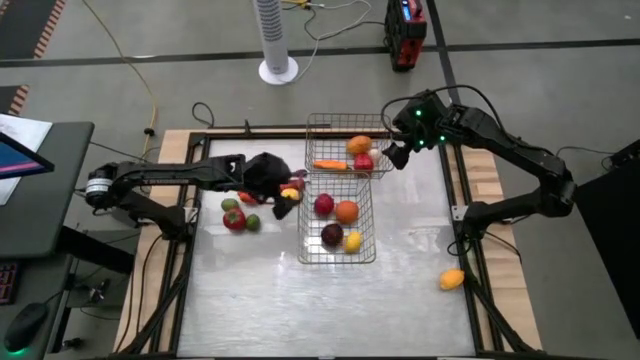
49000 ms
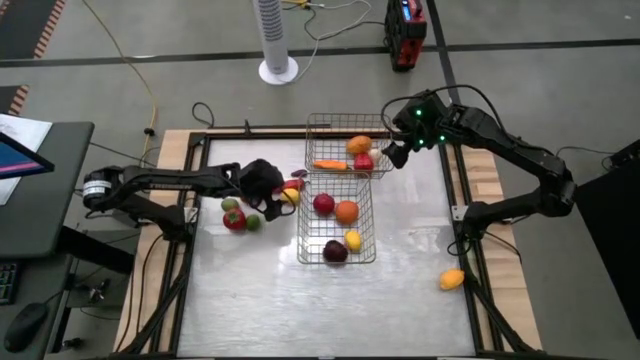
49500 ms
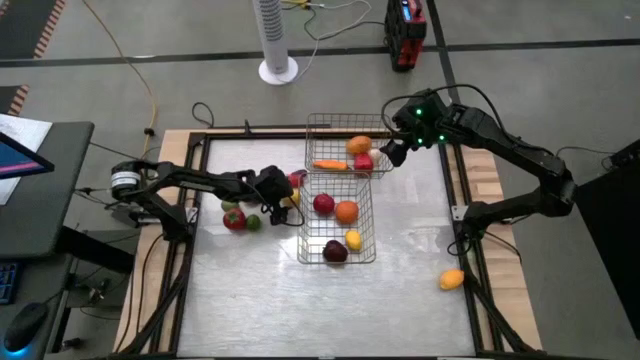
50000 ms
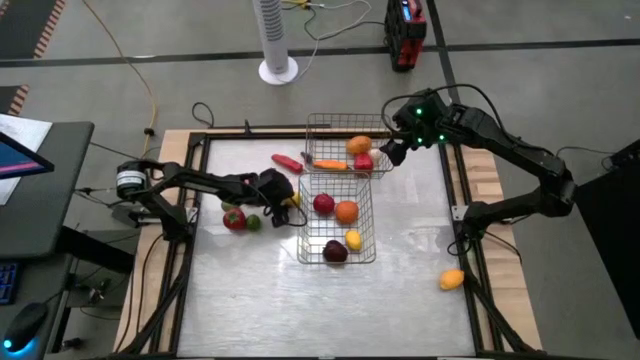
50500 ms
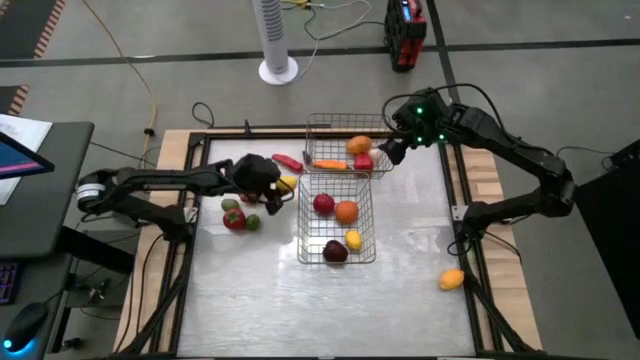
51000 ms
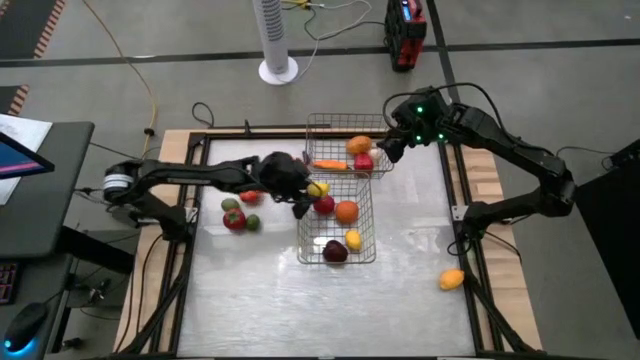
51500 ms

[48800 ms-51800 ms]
Task: Sort produce into baskets
Put the left lemon into the bottom wire basket

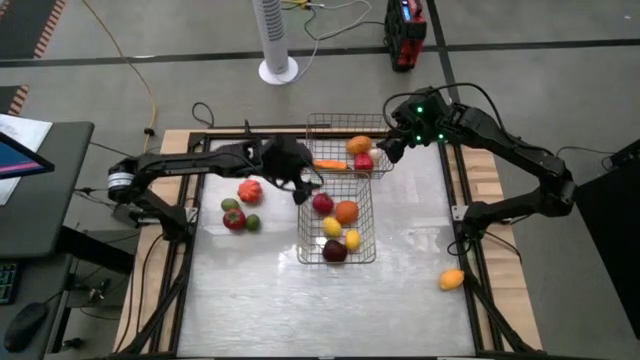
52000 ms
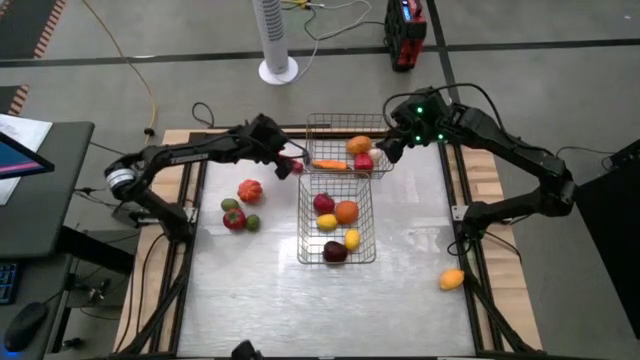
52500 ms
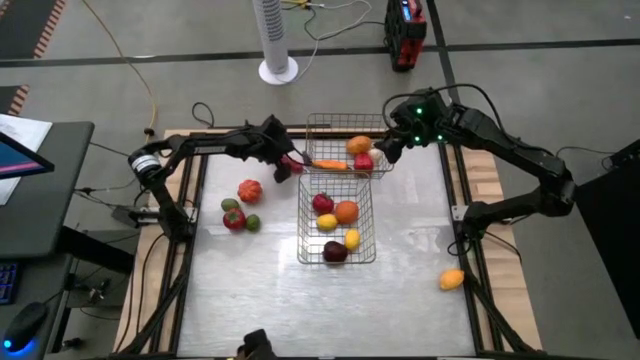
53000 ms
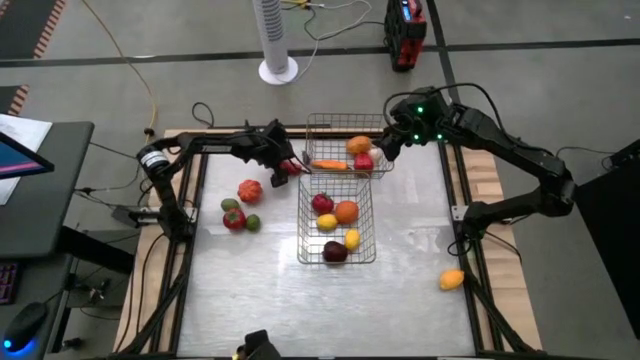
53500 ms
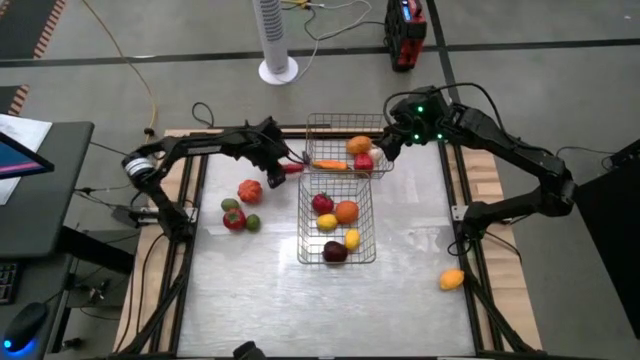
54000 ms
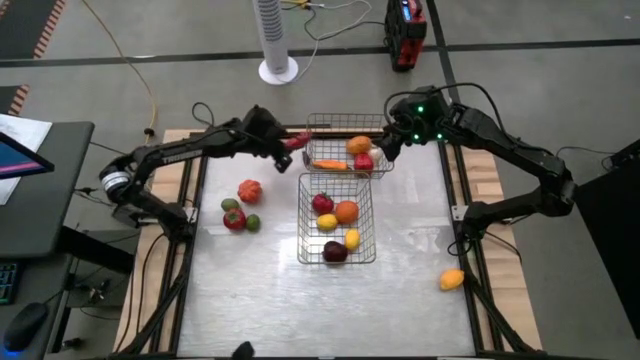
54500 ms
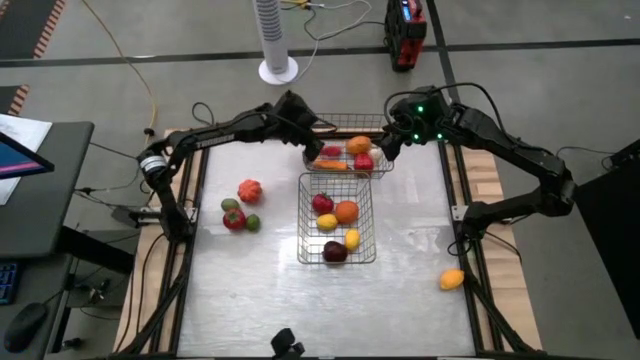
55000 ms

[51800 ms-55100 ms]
Put the red chili pepper into the top wire basket

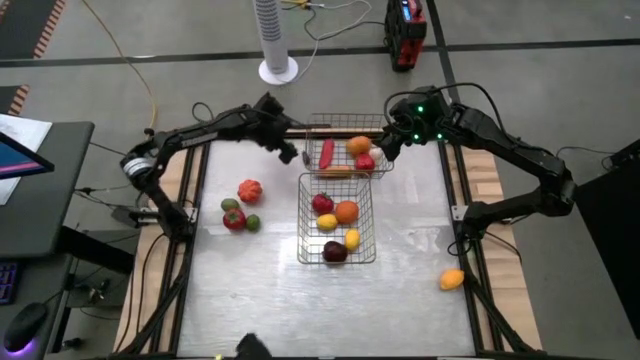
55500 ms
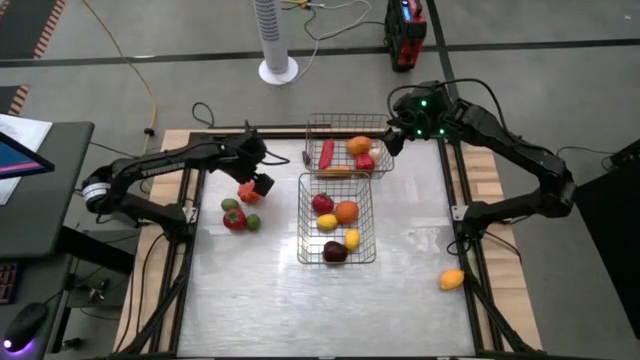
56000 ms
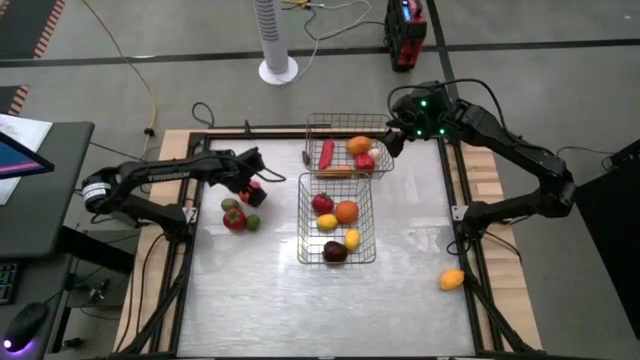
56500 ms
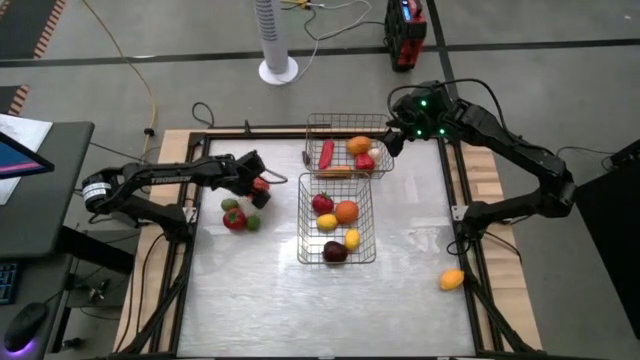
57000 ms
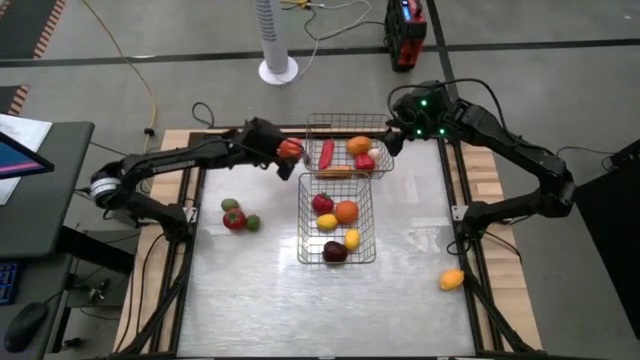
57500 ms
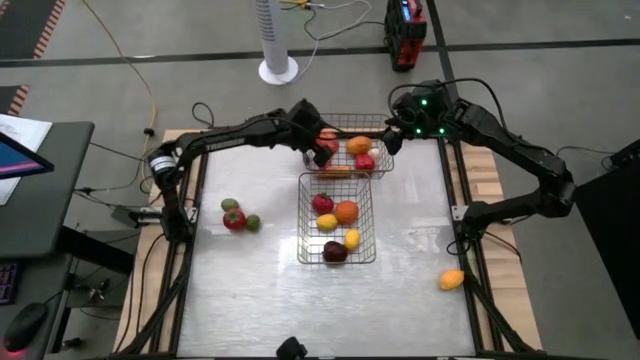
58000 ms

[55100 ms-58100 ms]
Put the pumpkin into the top wire basket

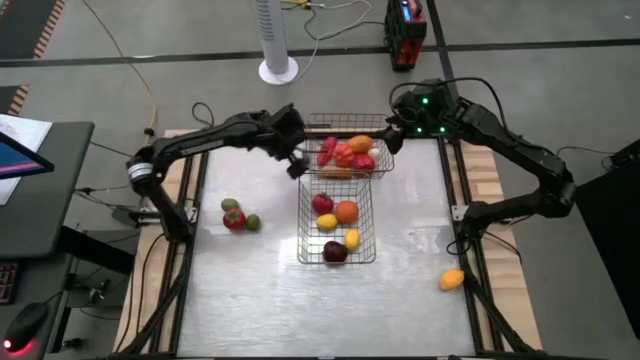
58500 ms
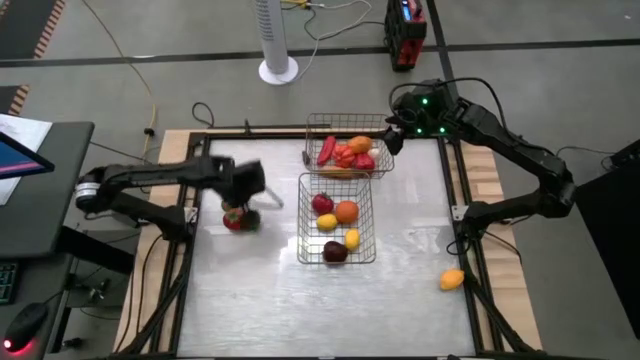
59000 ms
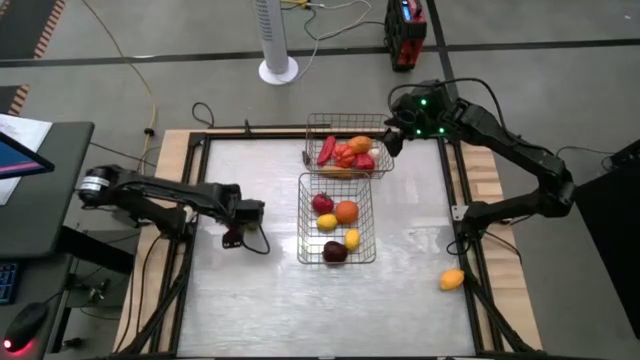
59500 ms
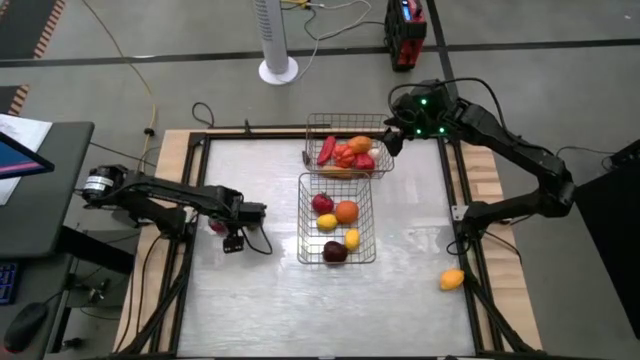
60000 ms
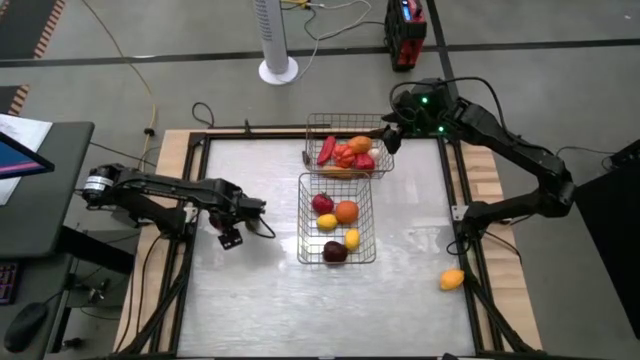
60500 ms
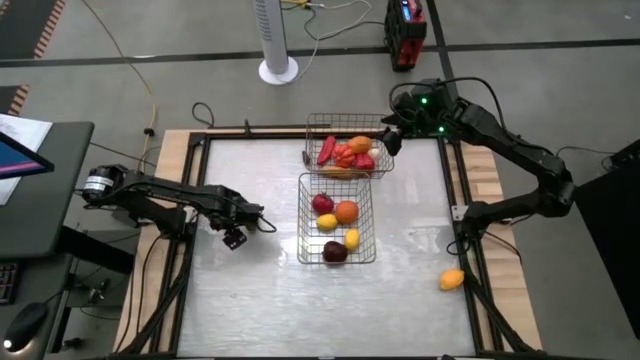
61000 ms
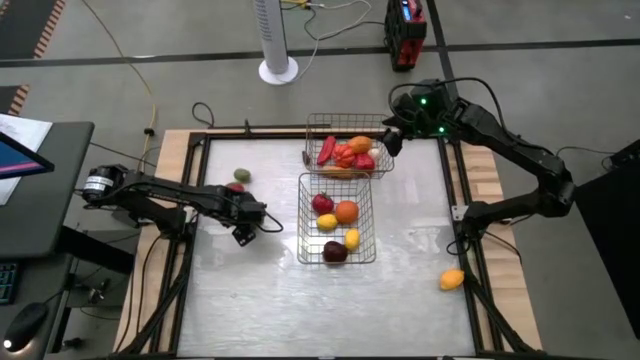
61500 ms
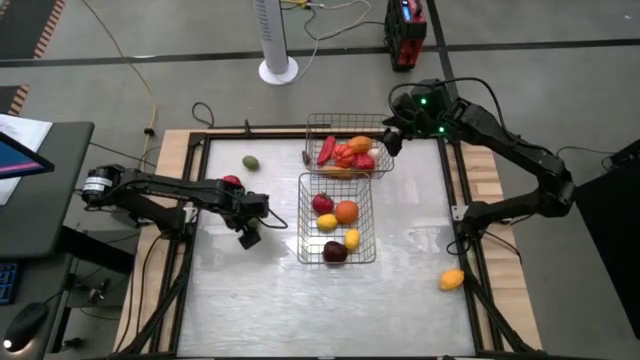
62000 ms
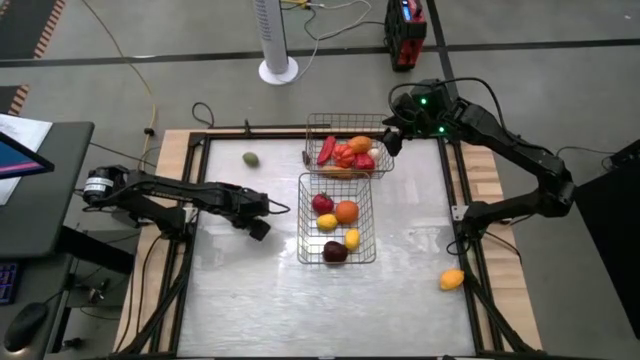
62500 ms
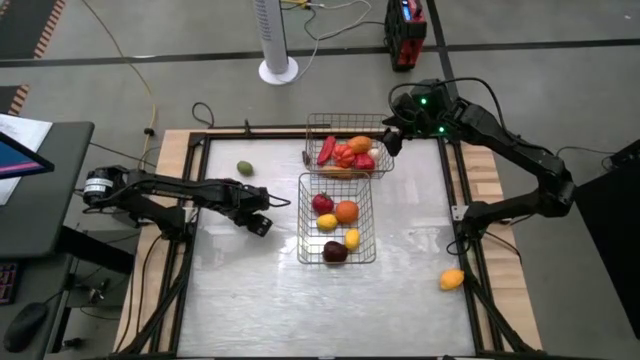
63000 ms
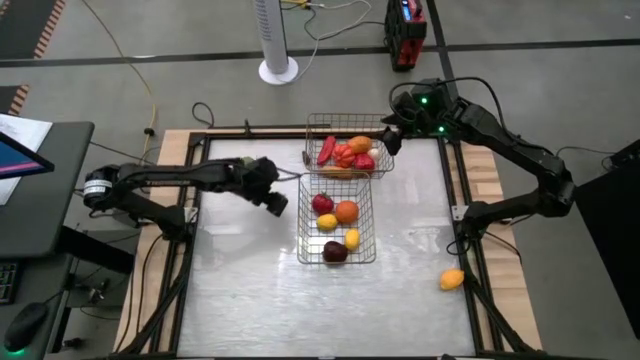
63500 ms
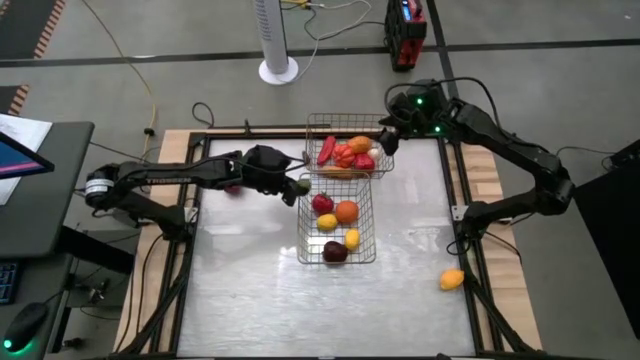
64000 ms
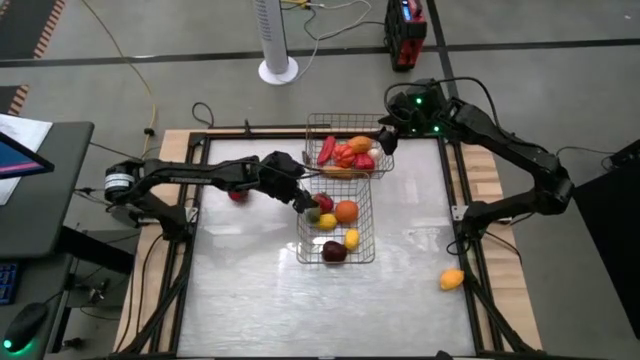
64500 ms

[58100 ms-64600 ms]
Put the bottom lime into the bottom wire basket

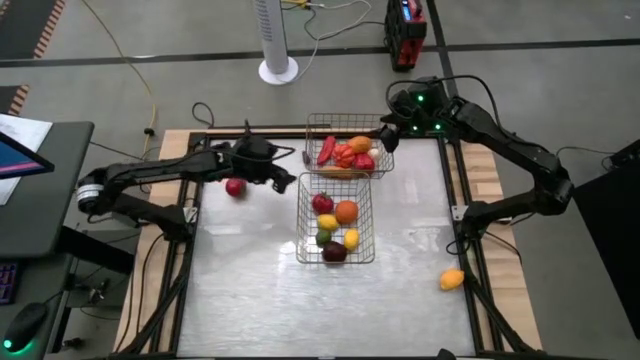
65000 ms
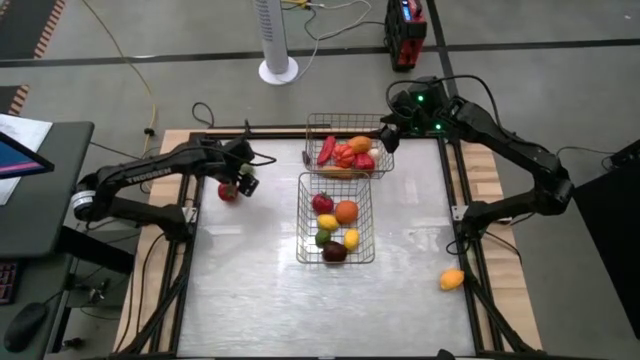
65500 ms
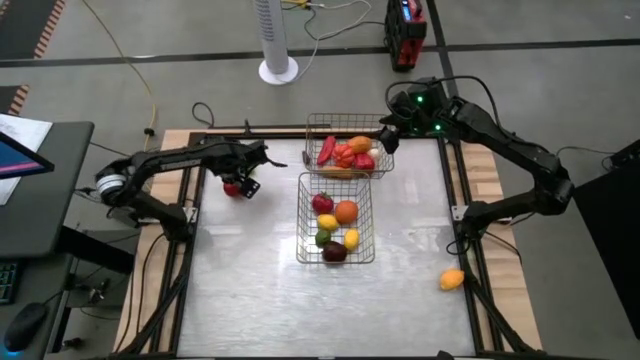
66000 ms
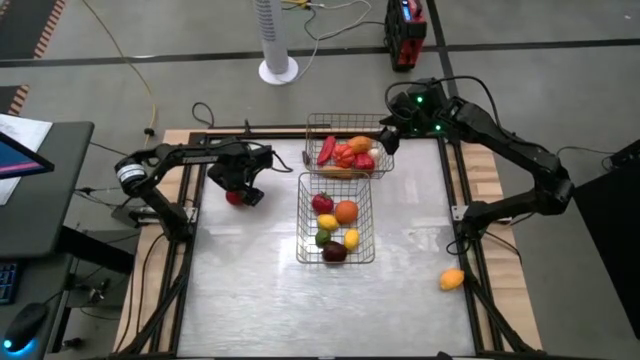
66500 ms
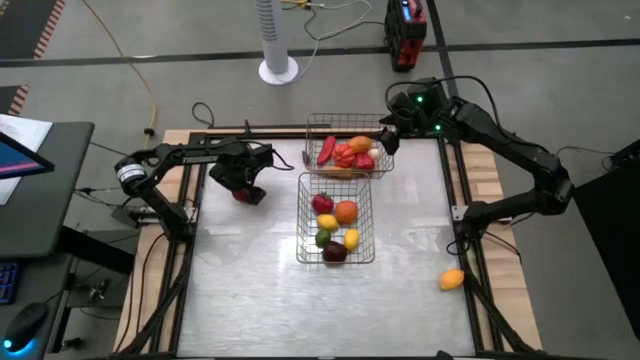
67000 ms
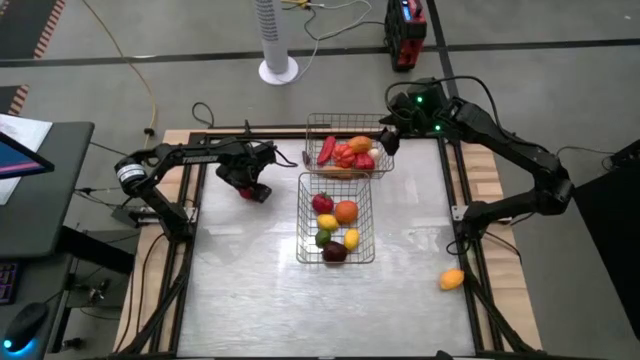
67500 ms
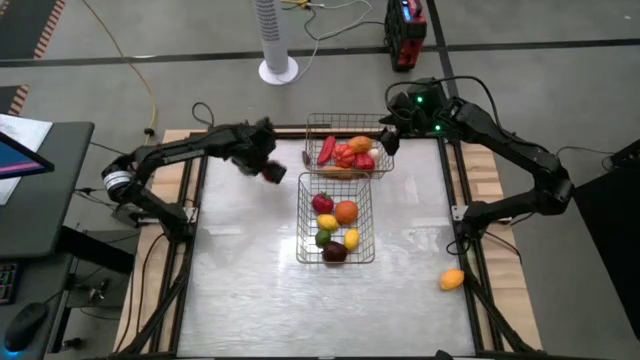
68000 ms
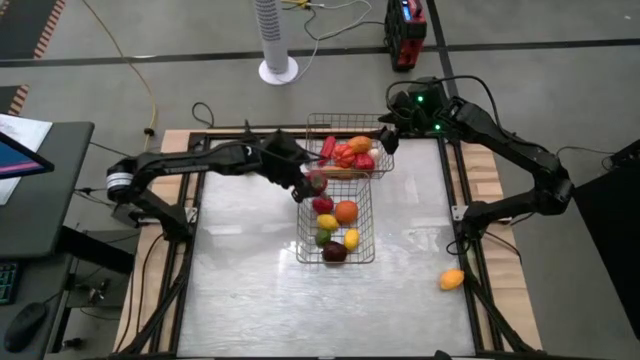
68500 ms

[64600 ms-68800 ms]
Put the tomato into the bottom wire basket

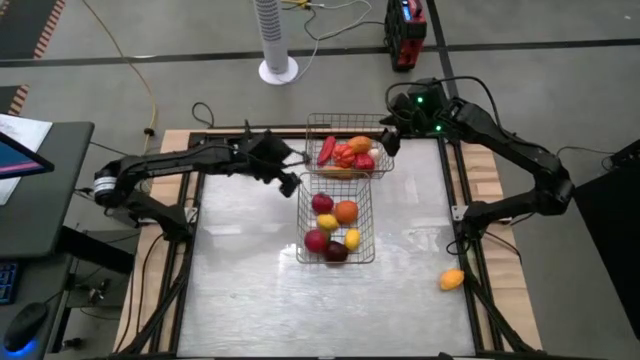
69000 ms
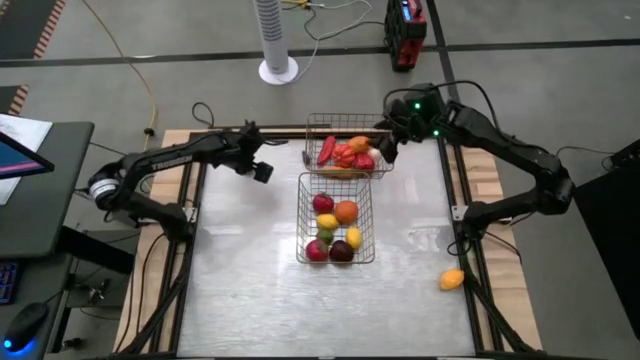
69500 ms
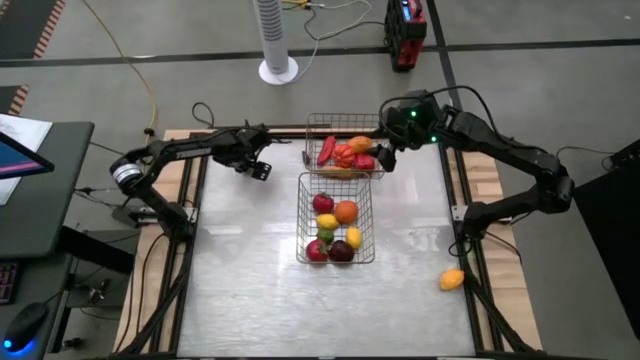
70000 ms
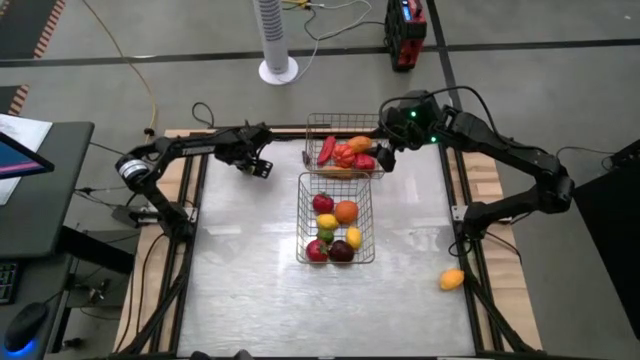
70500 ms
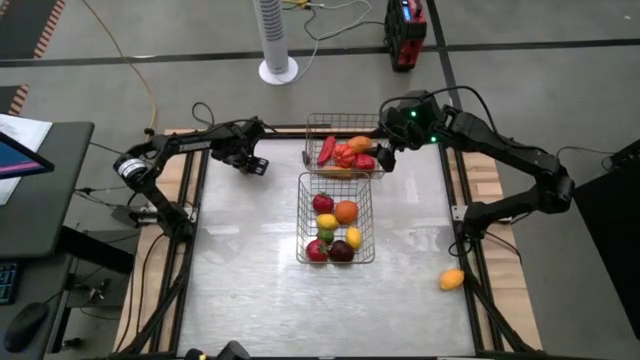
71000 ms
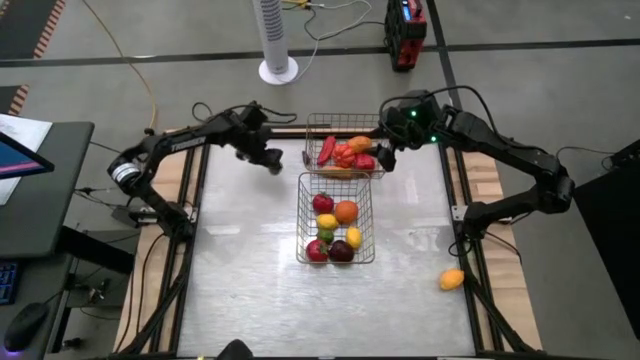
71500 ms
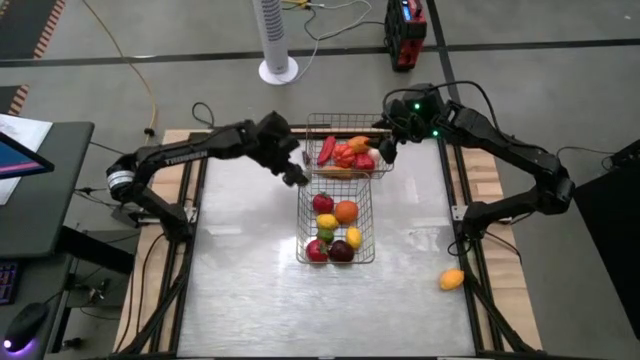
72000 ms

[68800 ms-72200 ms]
Put the lime into the bottom wire basket
